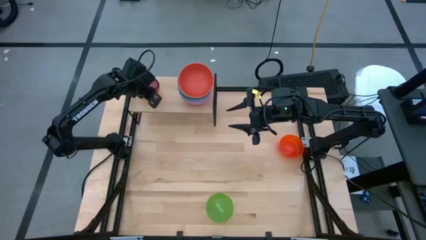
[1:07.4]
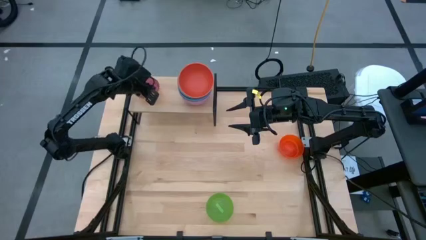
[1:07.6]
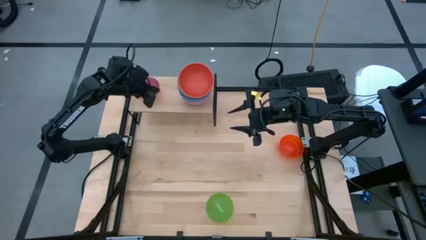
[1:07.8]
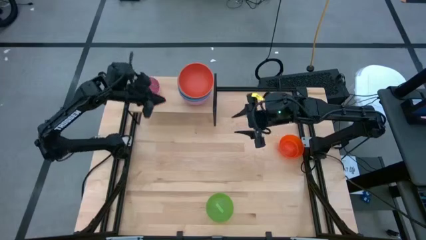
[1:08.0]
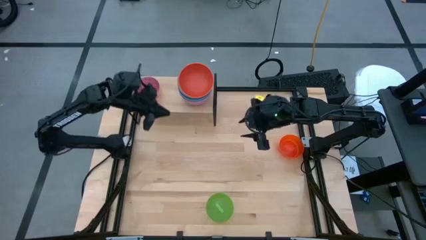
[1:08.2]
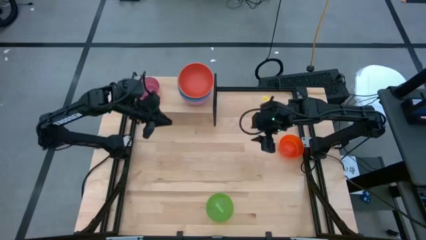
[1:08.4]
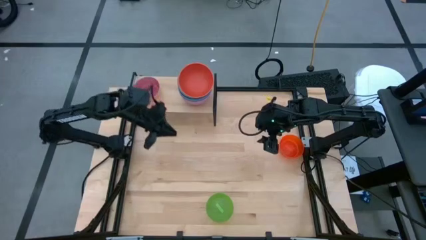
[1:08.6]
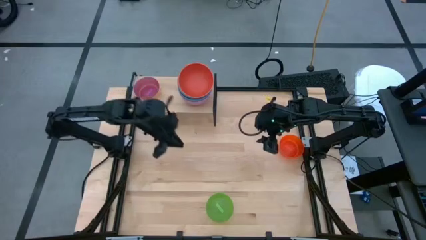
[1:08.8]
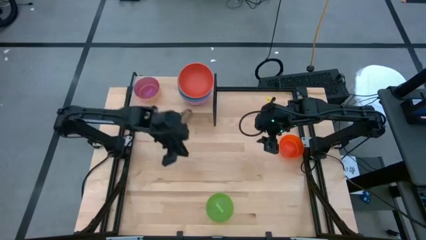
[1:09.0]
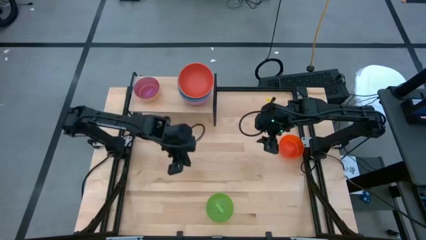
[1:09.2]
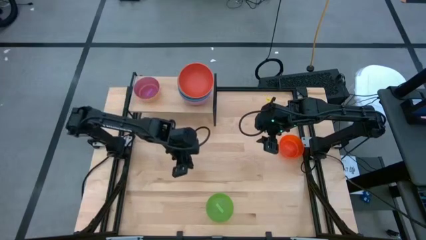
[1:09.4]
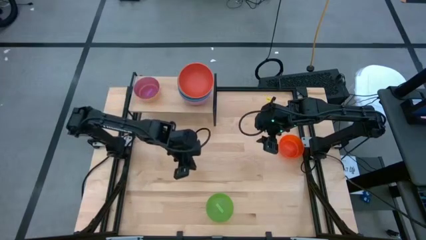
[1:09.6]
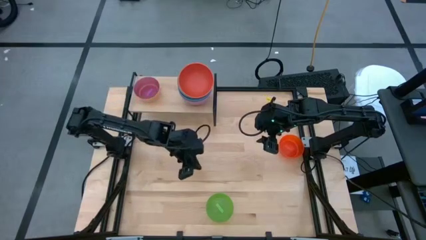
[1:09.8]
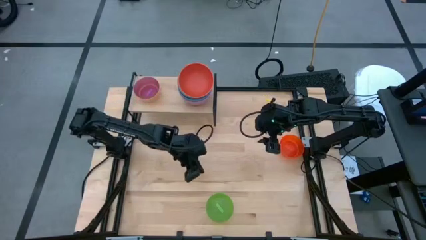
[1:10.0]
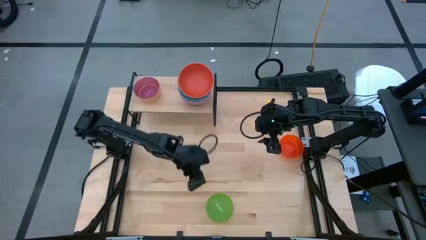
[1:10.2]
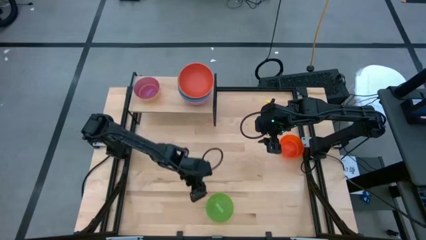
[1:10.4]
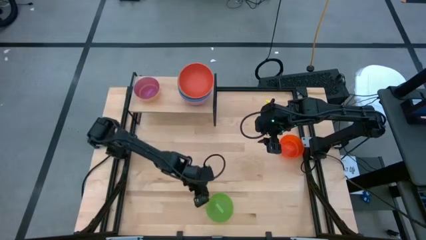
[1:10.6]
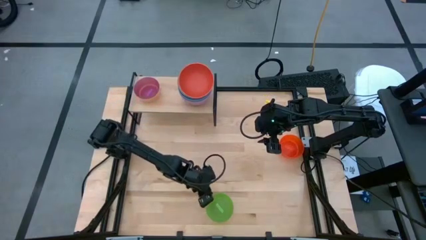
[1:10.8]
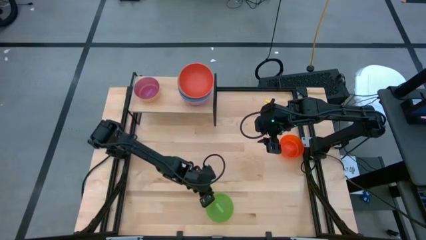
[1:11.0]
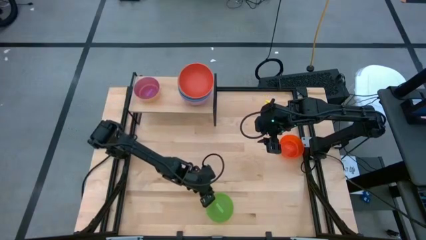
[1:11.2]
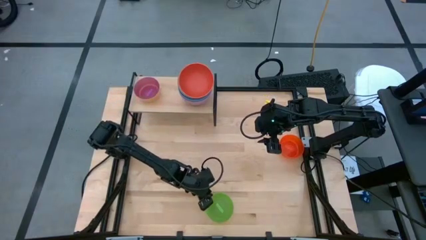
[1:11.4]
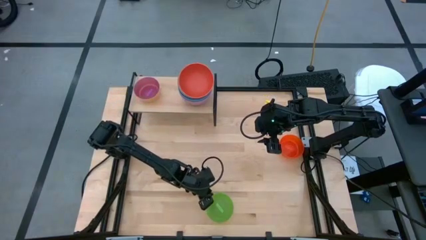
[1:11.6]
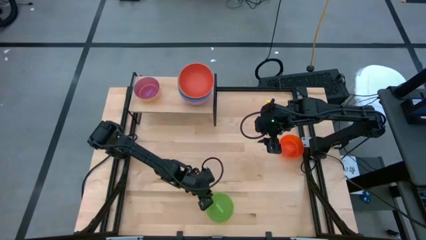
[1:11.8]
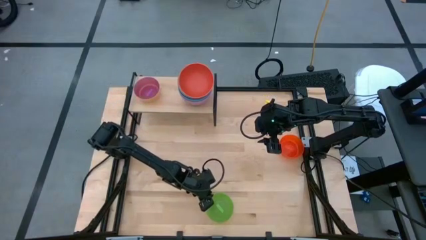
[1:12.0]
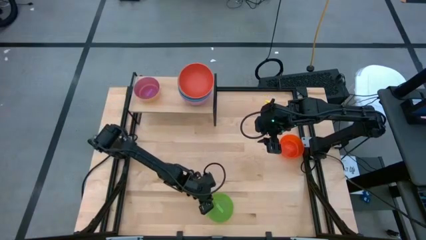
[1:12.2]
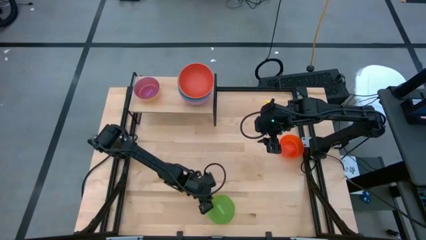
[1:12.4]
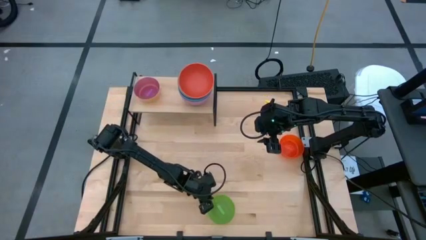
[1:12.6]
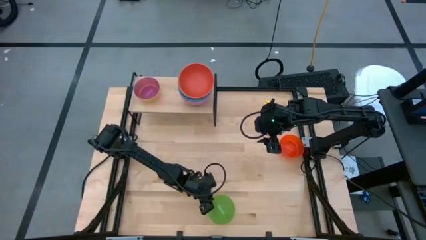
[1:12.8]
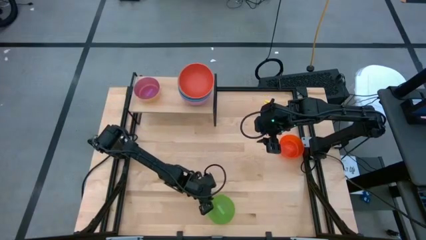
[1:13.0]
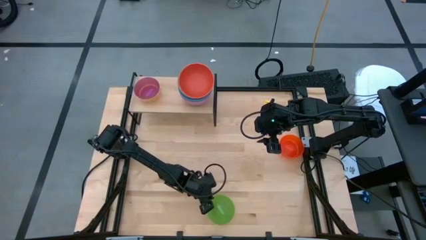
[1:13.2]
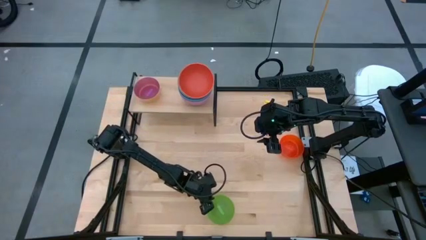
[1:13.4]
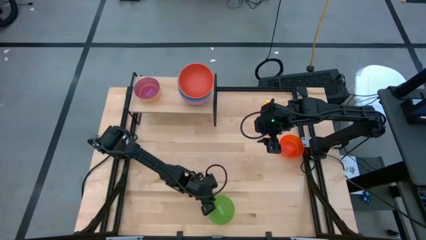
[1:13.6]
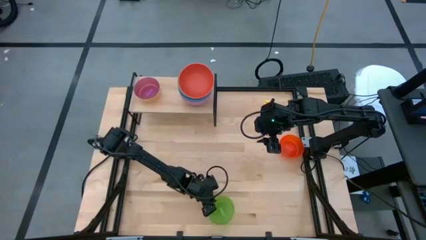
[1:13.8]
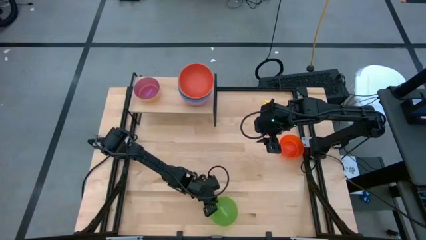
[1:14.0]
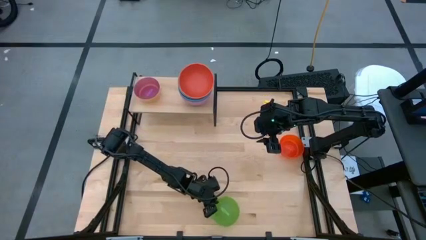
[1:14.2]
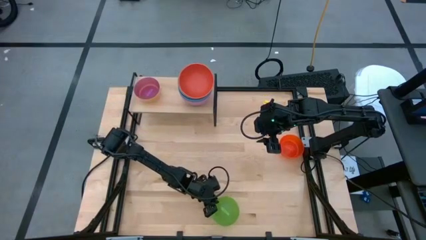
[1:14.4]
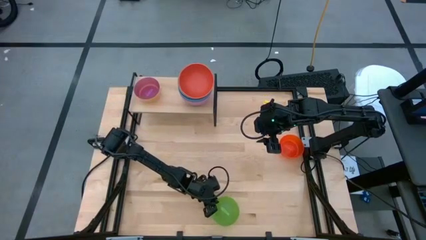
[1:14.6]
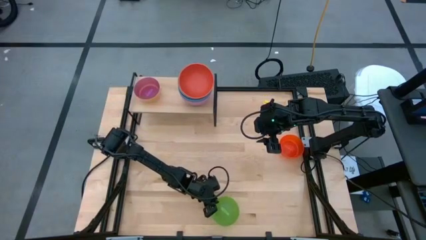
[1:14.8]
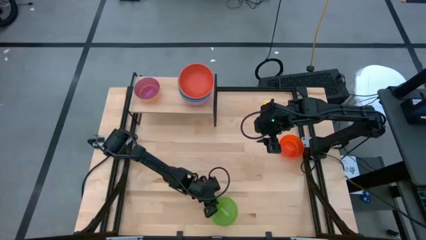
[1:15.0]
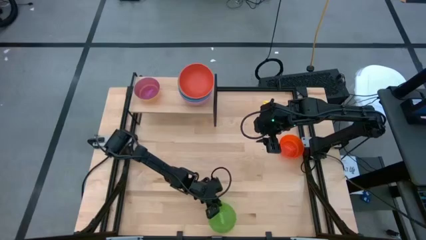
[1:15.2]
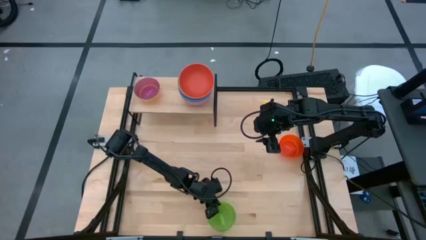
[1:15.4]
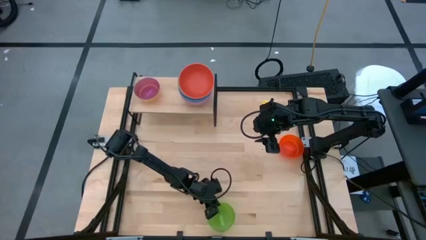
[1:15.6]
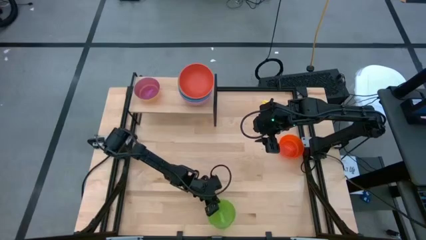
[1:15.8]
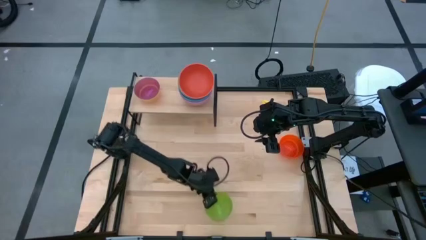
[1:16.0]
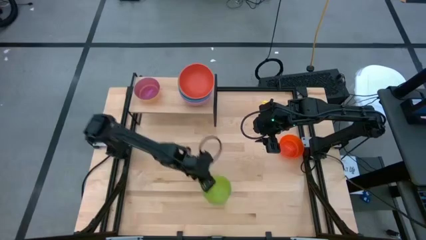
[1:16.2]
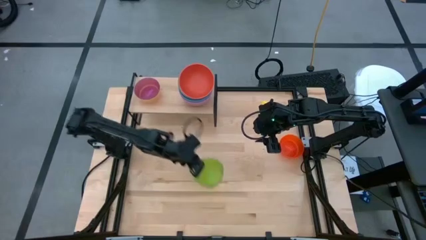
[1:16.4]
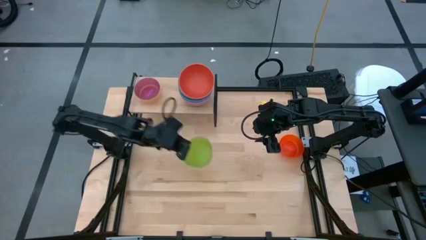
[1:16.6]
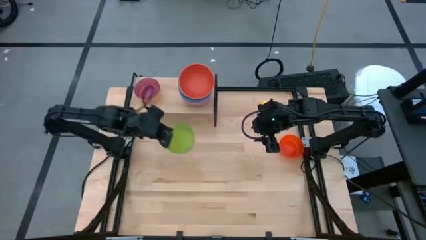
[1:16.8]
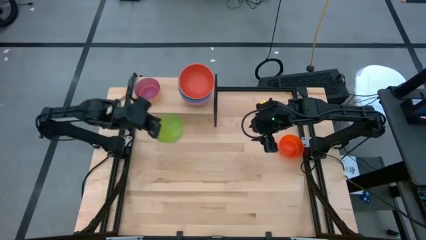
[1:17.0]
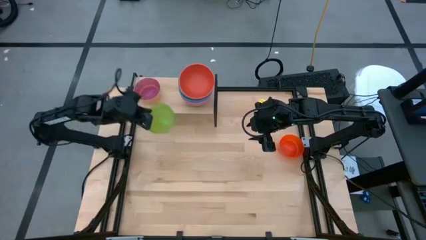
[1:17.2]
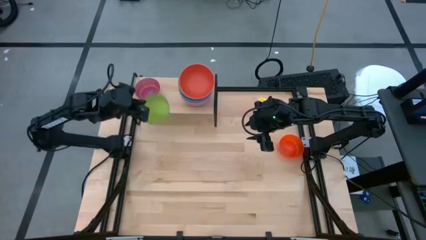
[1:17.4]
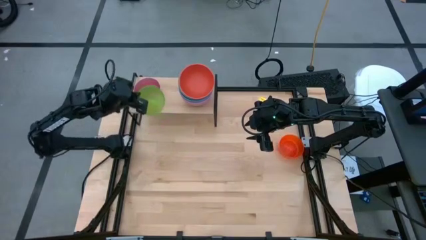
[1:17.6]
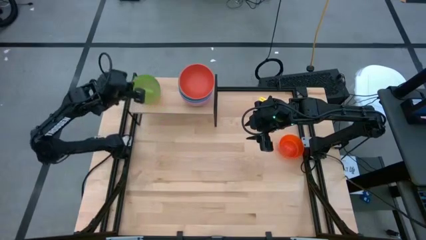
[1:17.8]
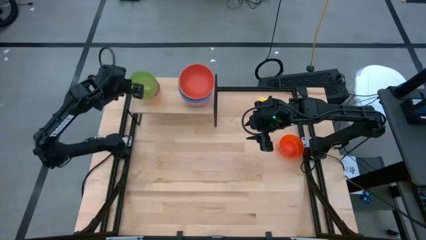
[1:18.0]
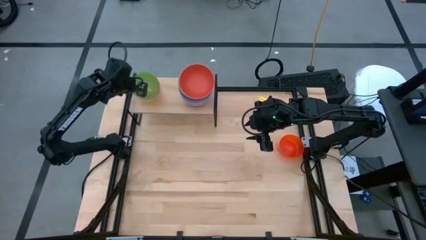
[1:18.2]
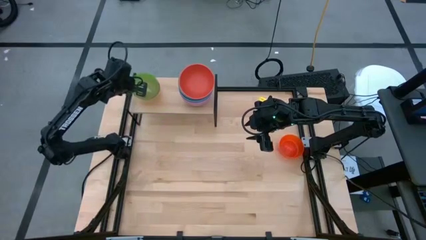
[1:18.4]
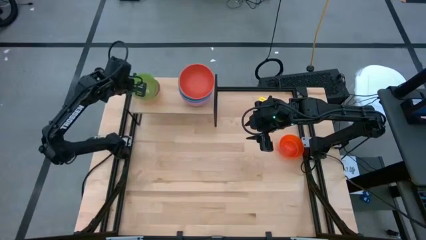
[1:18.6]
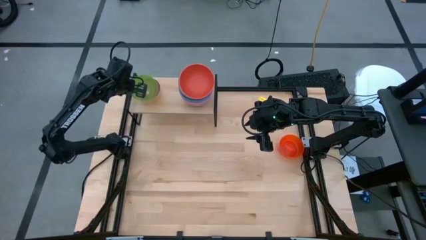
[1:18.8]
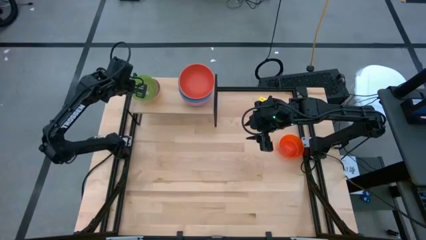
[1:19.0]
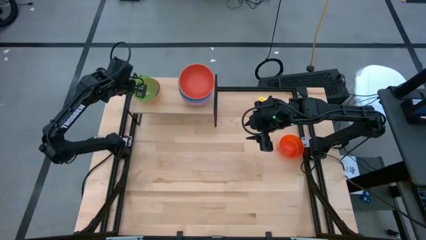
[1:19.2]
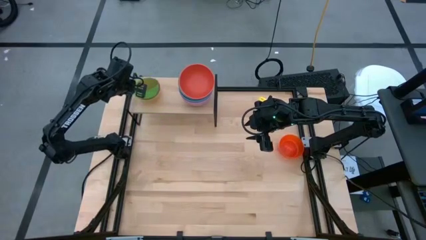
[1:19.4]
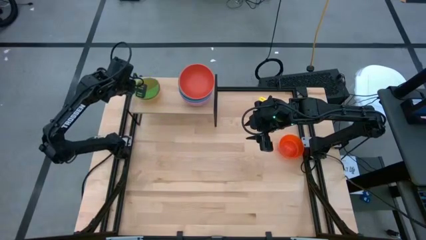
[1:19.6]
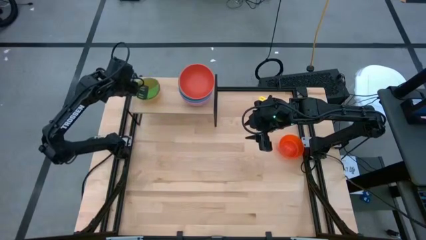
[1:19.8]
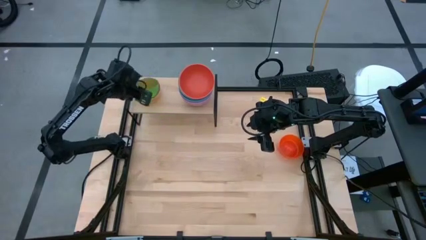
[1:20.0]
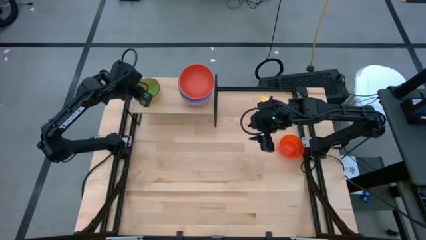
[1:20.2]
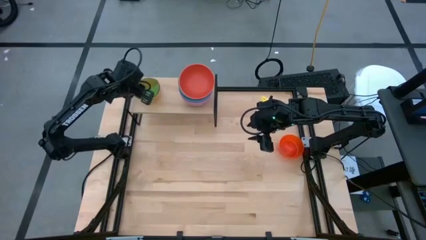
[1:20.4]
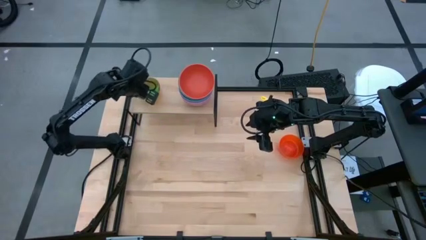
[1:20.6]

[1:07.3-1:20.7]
Task: Place and stack bowls onto a shelf
Stack the green bowl on the purple bowl on the shelf

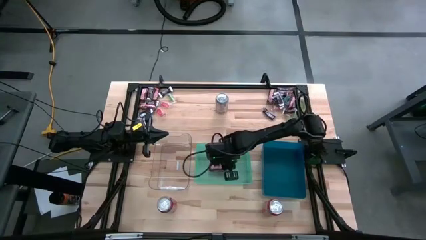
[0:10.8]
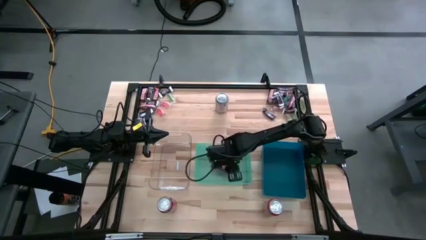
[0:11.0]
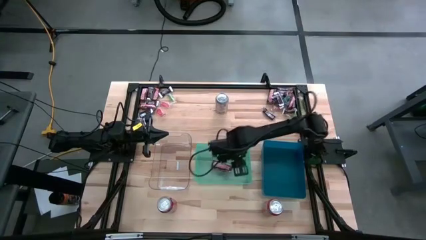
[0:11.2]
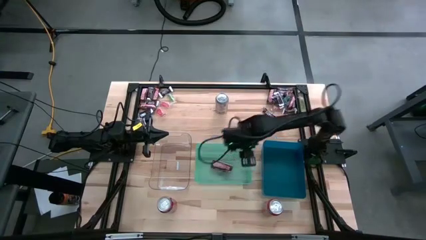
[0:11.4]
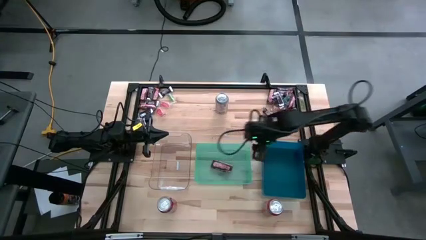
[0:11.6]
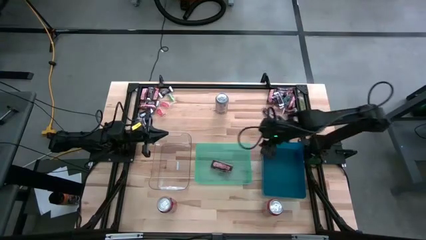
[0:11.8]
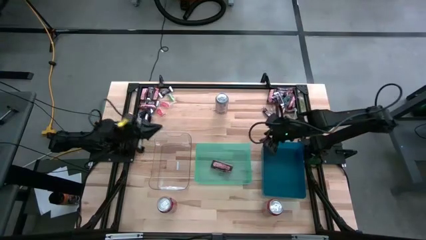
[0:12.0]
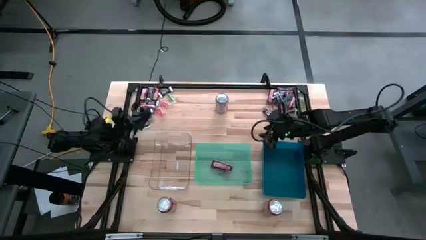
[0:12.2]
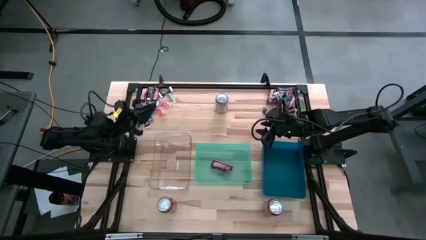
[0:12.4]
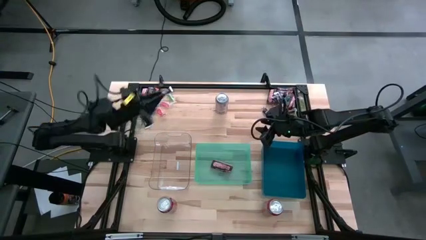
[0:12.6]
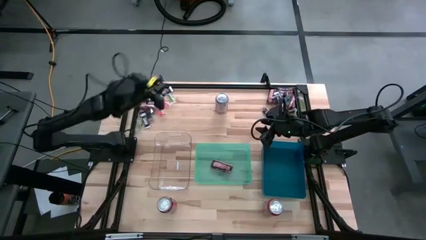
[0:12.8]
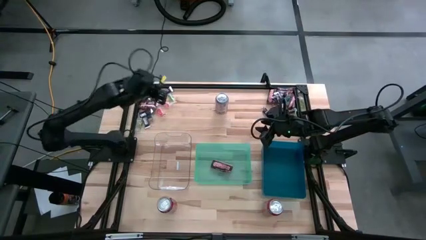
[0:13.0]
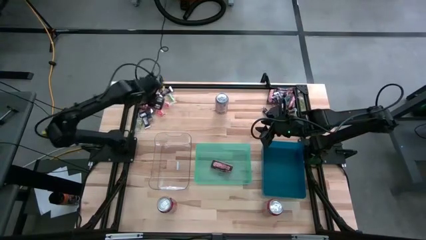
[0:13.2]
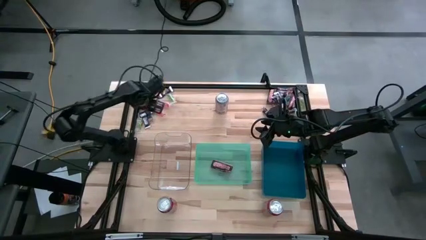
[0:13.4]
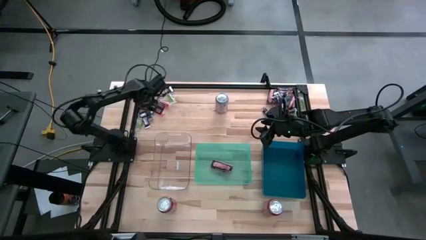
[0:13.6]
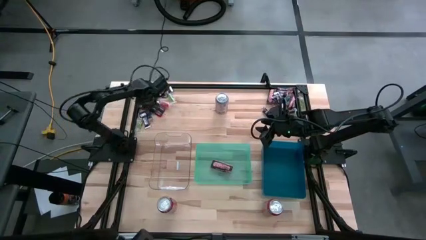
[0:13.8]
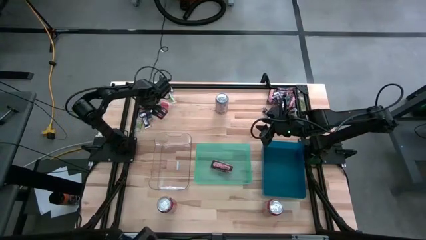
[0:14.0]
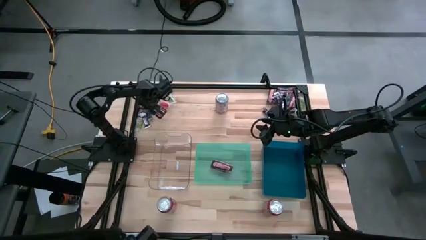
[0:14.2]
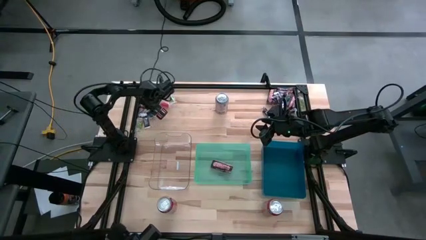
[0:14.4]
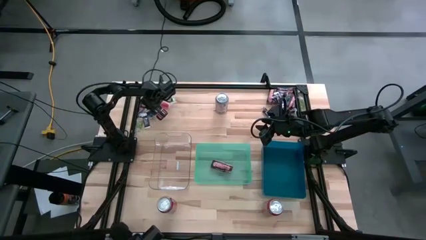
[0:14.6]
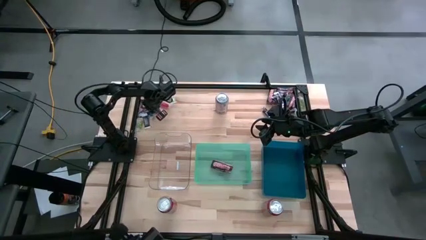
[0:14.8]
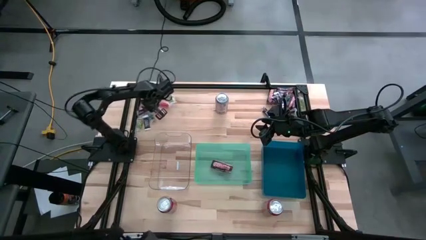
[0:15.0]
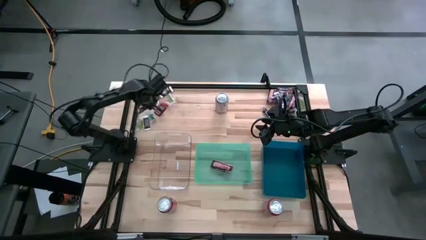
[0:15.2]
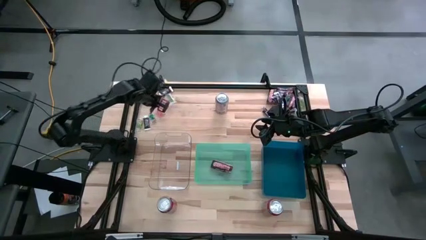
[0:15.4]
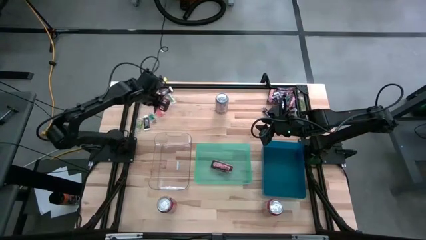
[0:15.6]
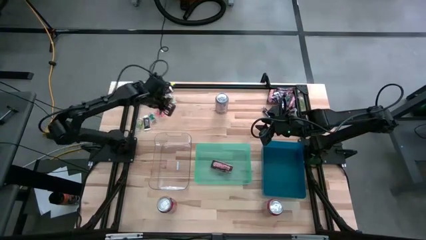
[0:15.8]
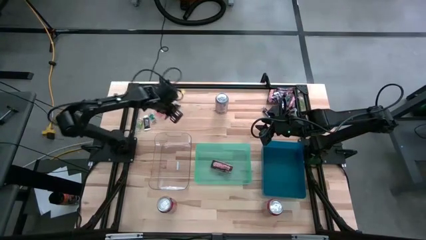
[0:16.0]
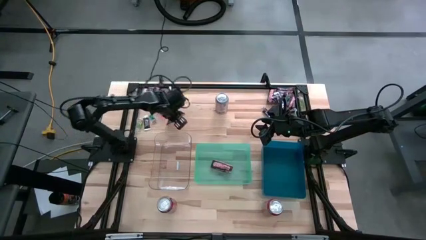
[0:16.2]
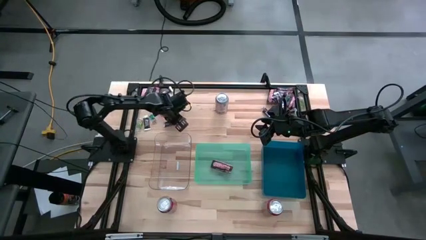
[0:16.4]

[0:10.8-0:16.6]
Task: Organize candy in baskets
Put the brown chocolate bar into the green bin
